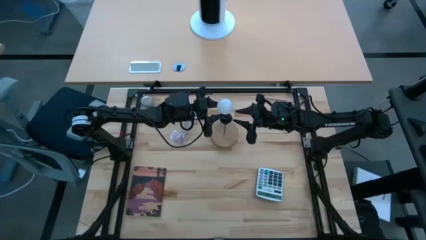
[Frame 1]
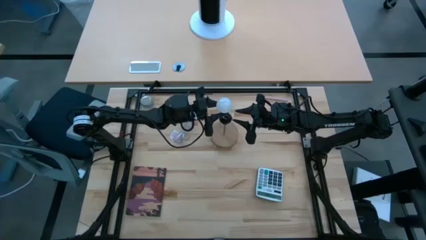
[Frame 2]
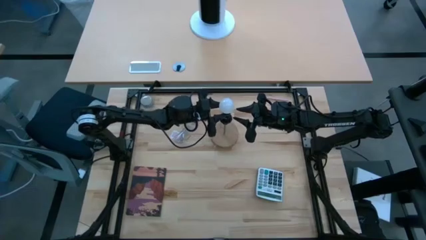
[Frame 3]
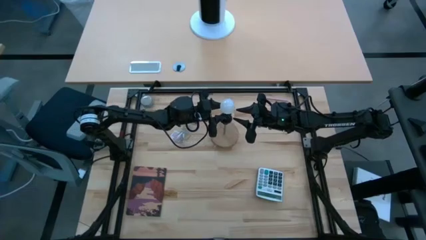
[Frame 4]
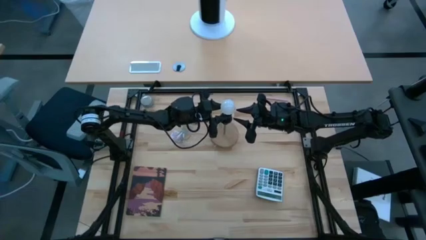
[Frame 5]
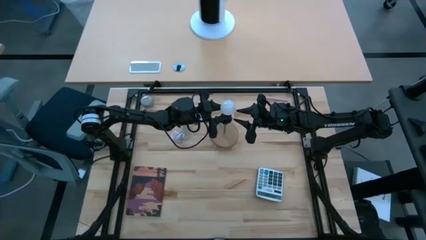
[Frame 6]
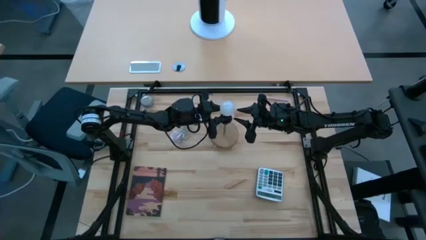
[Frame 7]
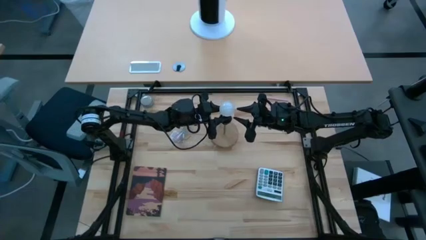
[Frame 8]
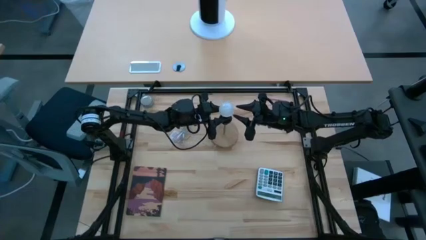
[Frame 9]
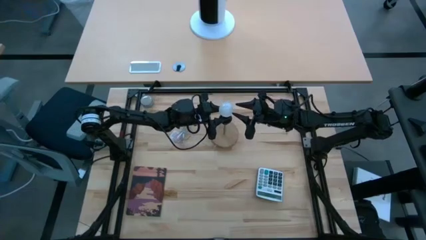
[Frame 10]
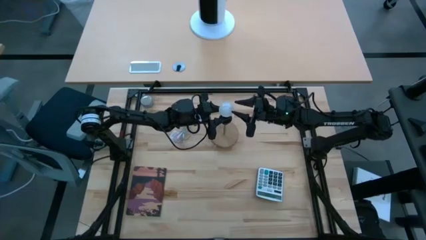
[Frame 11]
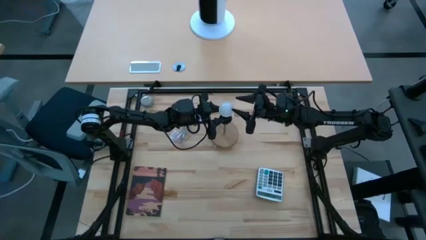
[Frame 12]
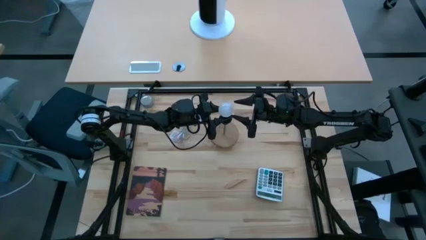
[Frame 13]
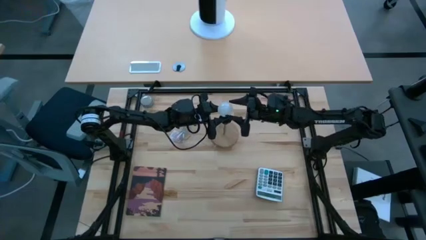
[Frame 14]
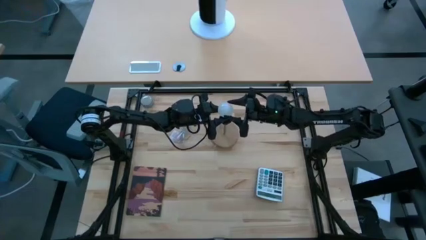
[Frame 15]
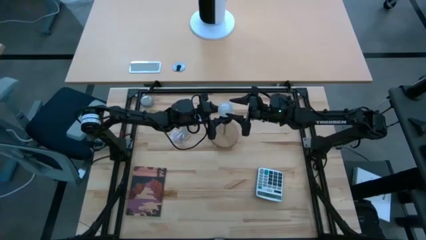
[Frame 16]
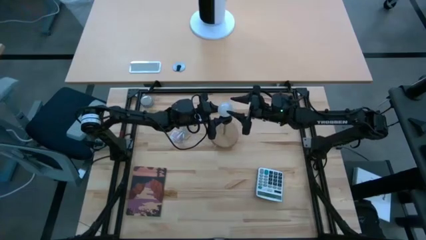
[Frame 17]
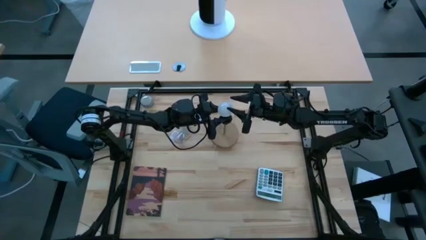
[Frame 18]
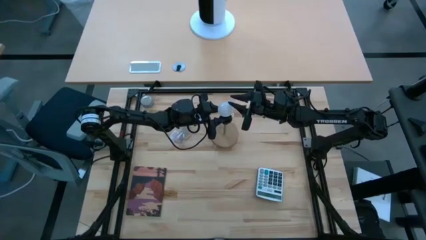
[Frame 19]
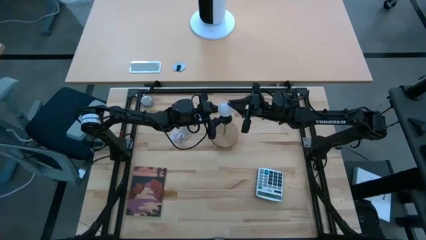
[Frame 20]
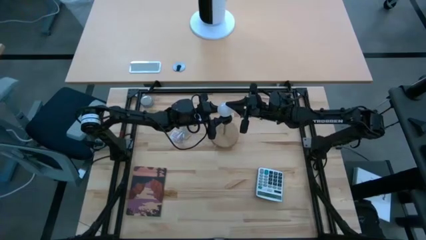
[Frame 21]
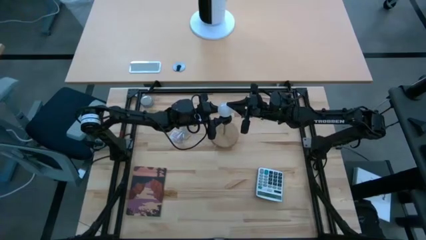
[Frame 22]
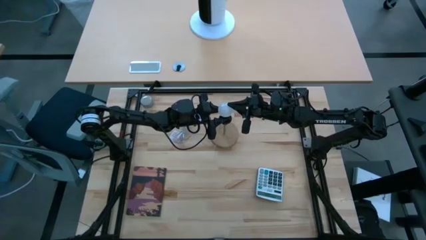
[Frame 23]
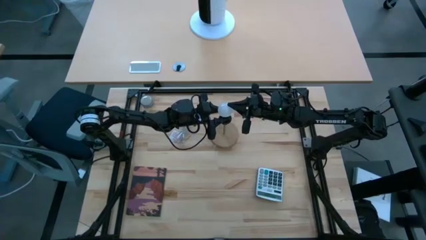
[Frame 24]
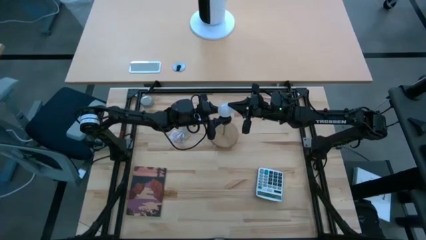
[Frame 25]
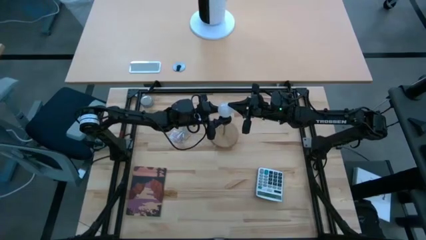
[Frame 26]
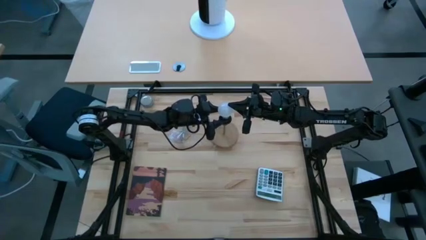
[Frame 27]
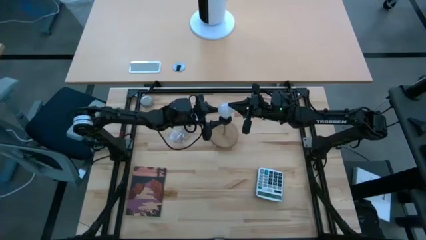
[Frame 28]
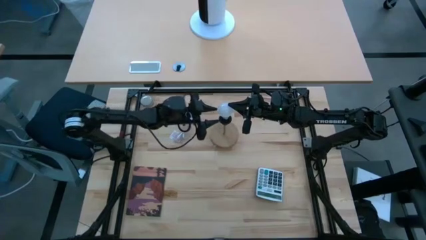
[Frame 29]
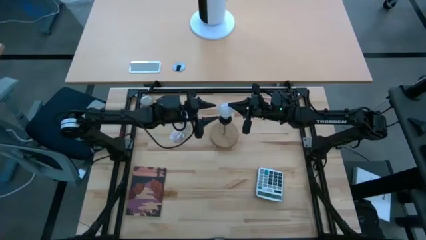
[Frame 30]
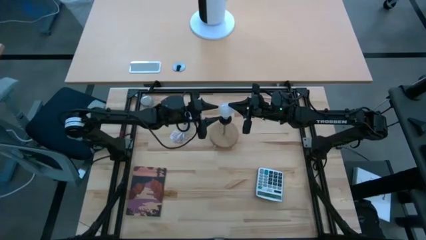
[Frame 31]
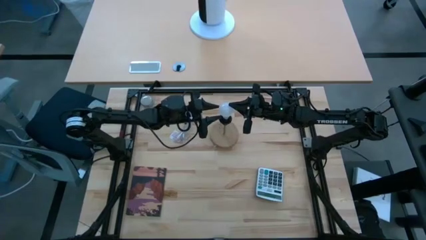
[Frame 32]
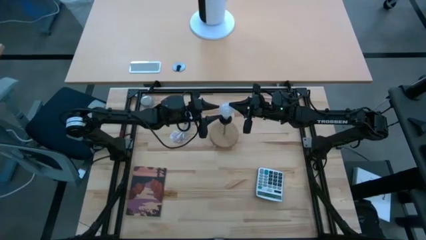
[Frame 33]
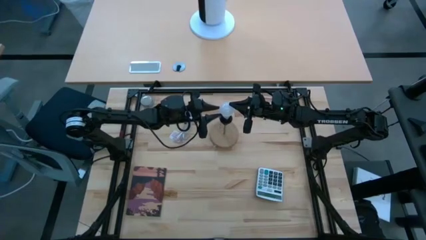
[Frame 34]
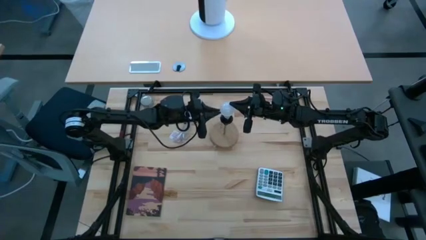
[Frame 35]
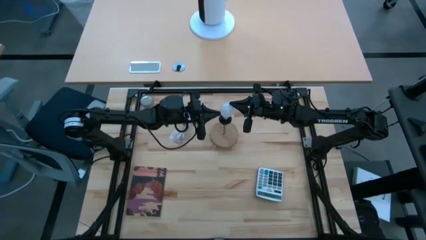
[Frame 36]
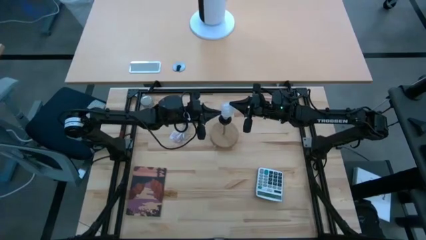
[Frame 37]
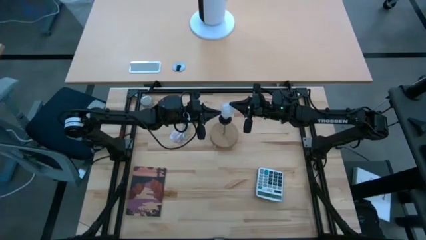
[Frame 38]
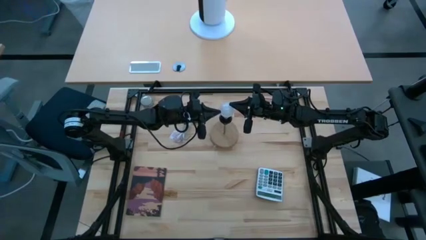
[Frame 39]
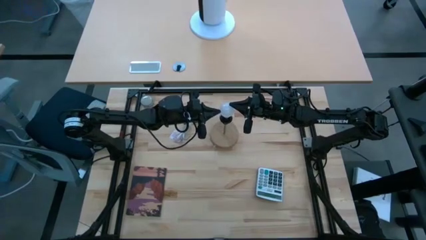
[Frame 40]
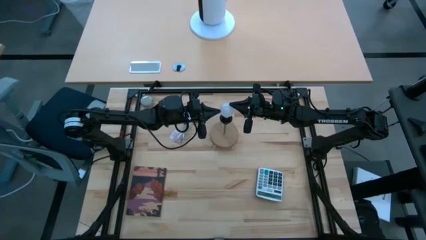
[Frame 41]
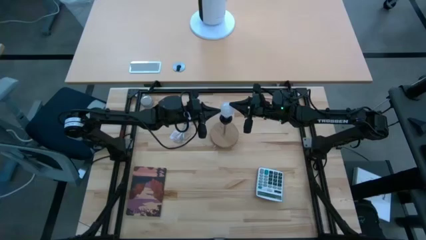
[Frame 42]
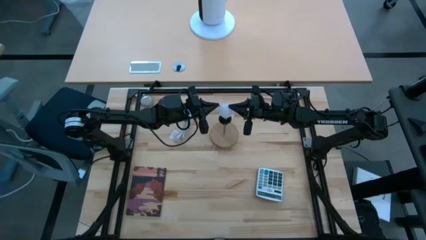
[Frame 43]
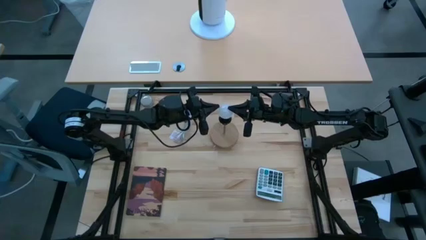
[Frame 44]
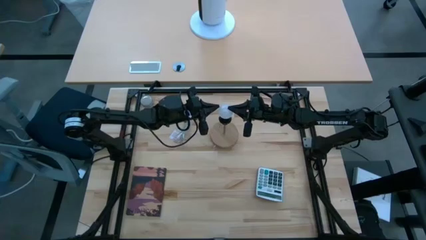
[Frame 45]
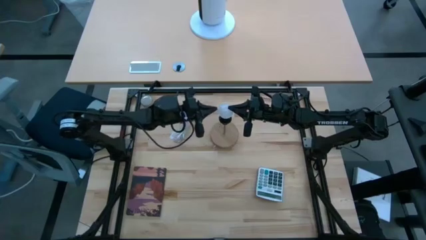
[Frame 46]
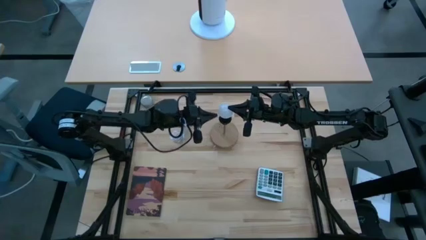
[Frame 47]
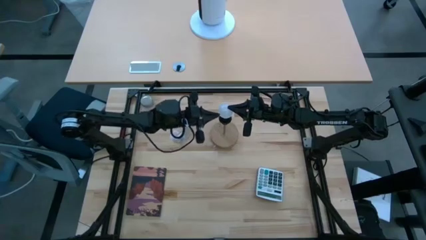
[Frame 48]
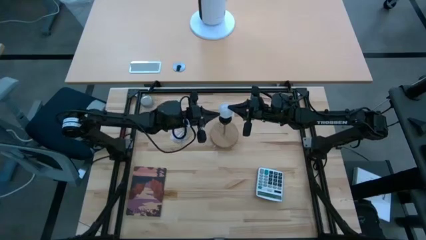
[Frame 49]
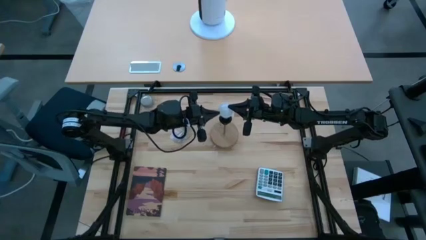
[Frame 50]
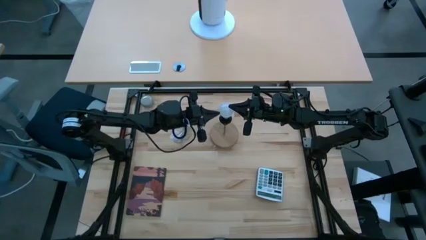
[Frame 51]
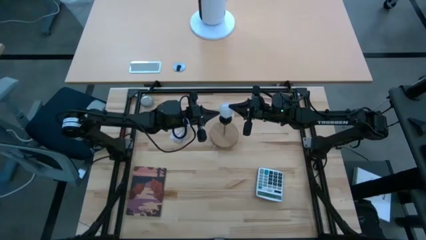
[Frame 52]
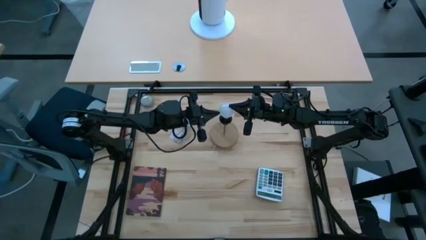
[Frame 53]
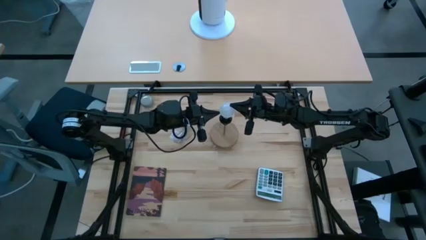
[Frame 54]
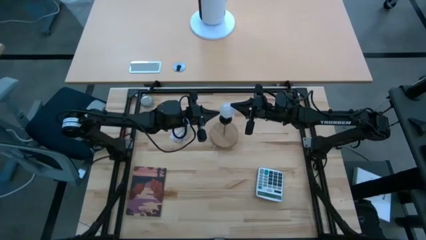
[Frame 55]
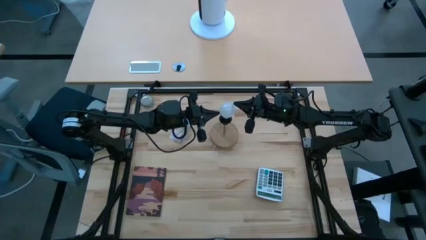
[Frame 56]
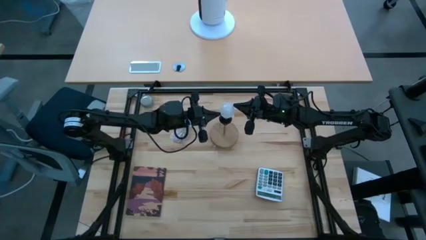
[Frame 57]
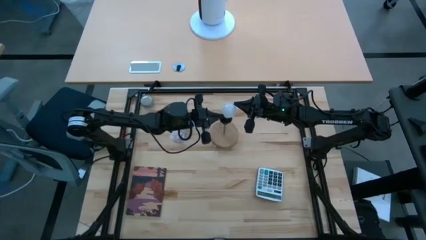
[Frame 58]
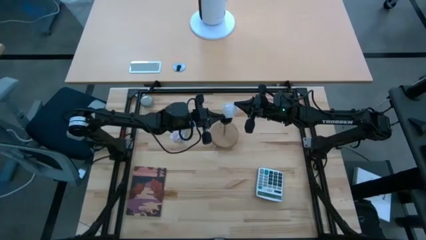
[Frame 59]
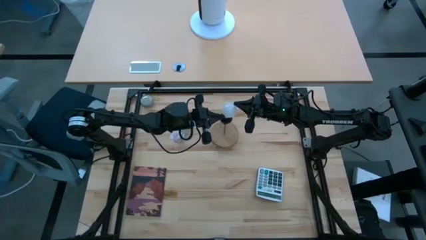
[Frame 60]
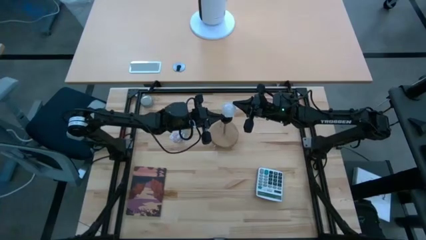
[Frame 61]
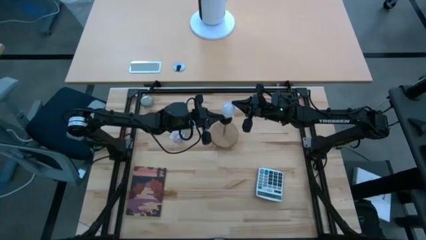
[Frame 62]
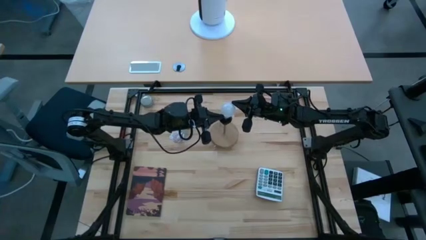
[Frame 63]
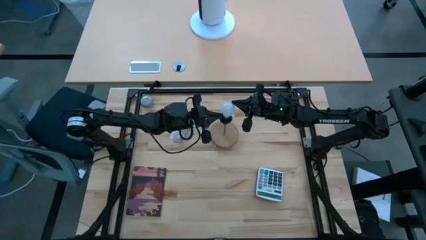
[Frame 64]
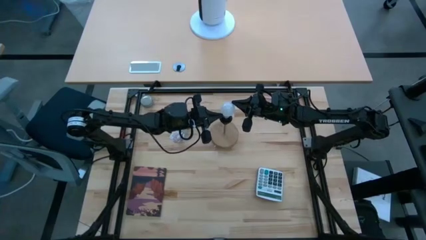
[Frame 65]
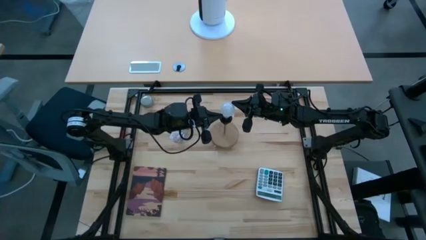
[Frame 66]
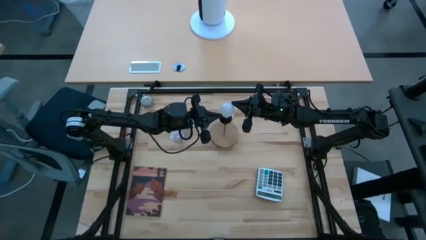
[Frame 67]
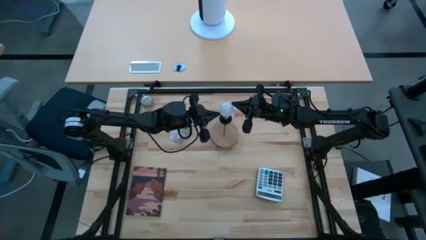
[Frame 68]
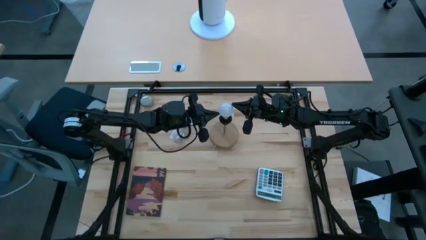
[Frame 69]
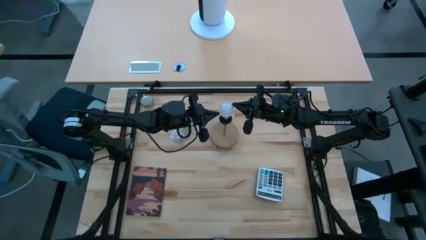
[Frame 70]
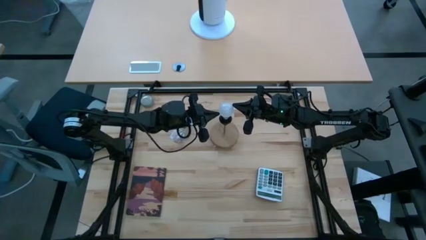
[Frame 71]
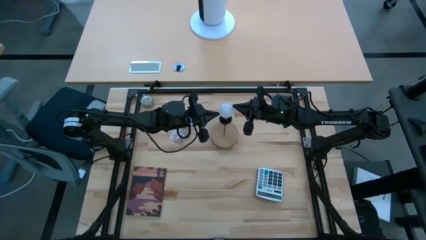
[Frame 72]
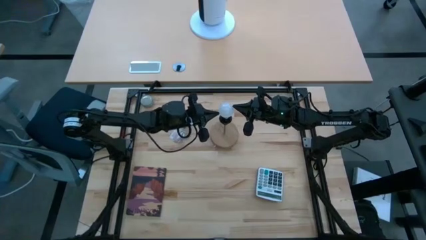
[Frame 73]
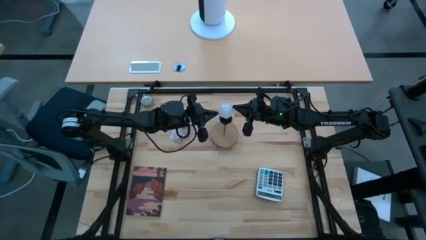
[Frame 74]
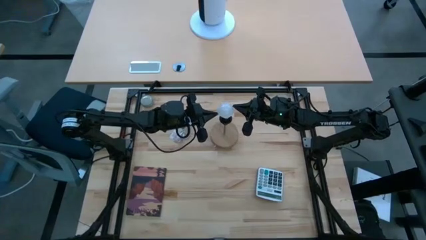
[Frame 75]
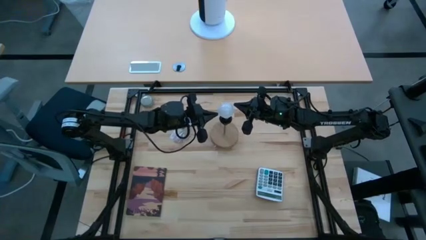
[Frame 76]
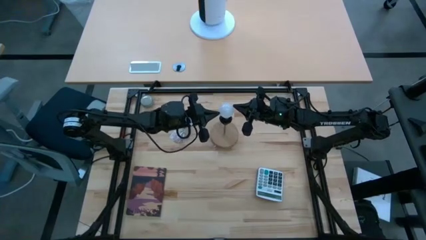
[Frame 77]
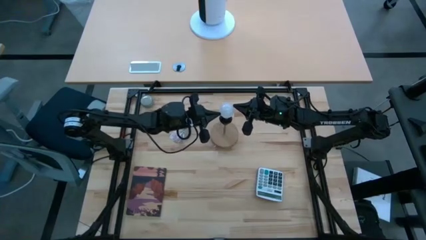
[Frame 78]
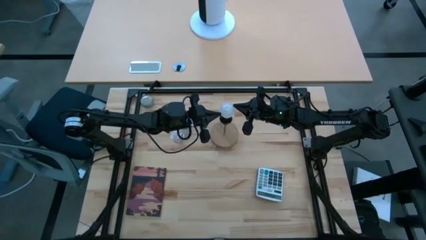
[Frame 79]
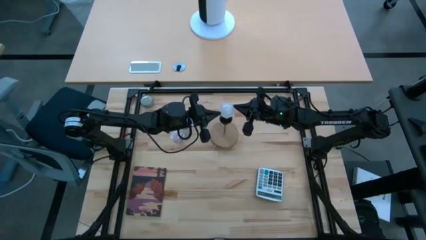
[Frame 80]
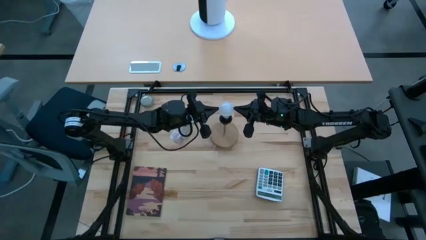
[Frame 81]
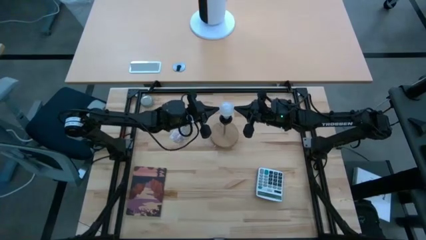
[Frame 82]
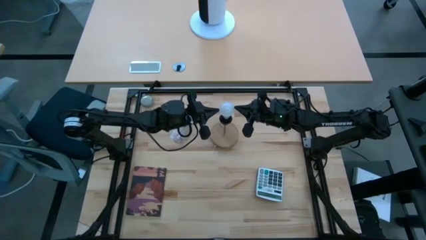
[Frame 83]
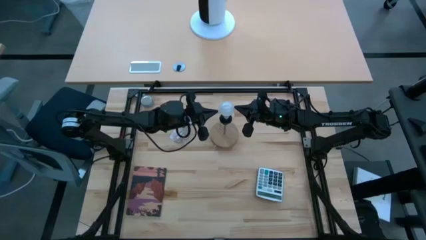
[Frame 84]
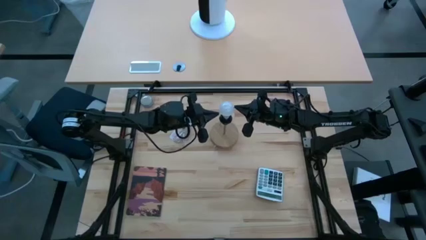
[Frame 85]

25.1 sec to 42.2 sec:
Task: Screw lightbulb
Insert the lightbulb into the lamp
